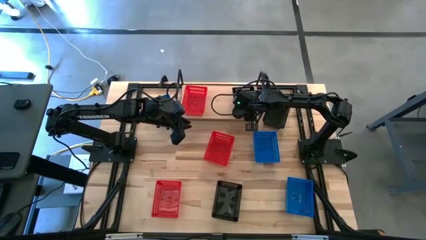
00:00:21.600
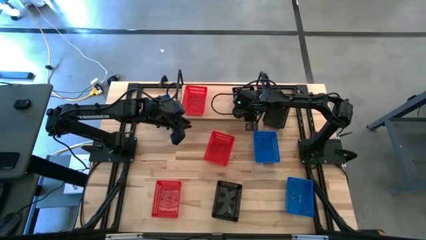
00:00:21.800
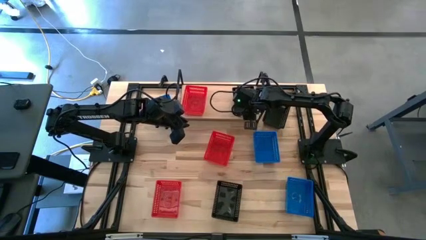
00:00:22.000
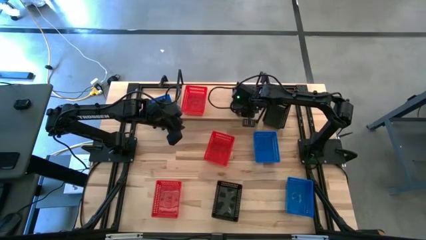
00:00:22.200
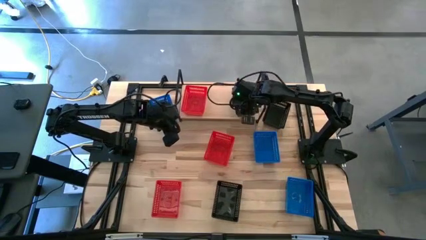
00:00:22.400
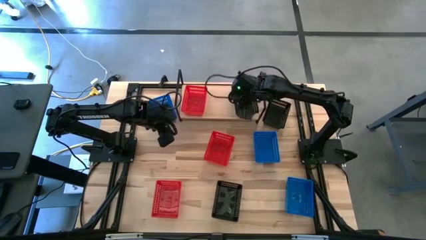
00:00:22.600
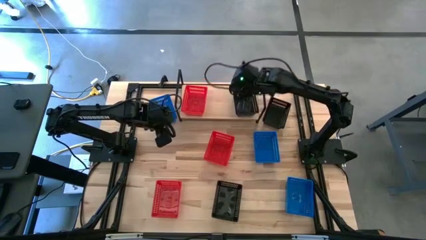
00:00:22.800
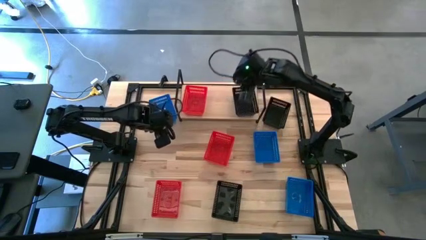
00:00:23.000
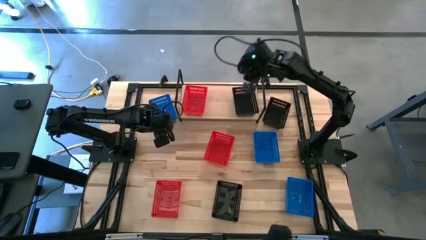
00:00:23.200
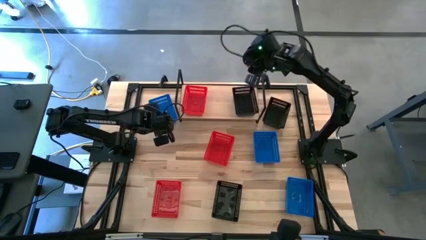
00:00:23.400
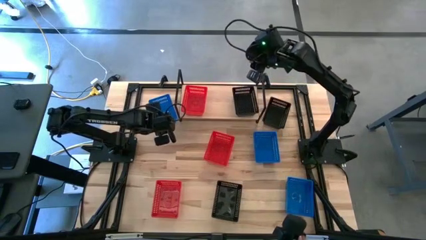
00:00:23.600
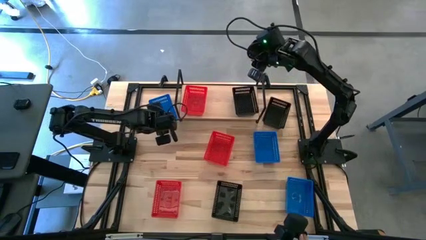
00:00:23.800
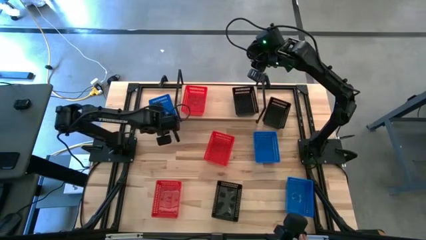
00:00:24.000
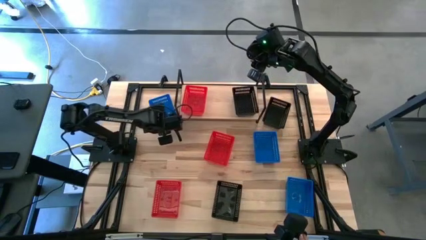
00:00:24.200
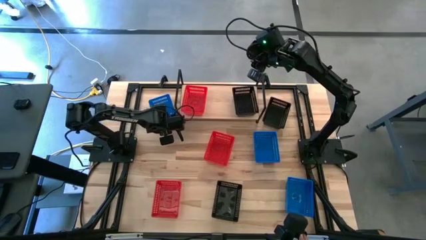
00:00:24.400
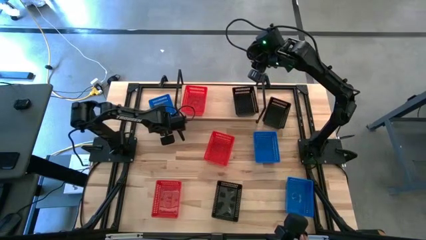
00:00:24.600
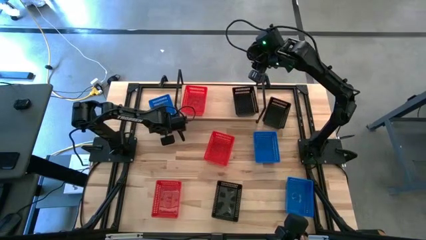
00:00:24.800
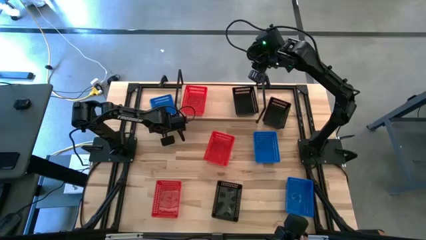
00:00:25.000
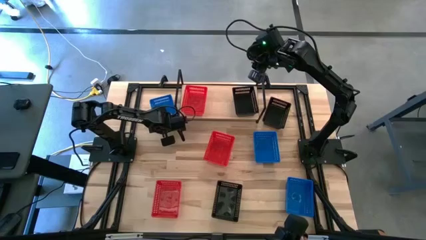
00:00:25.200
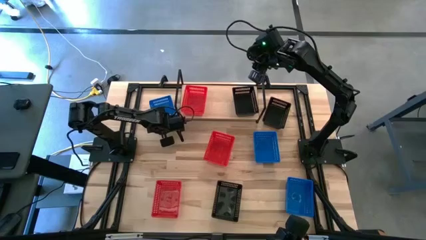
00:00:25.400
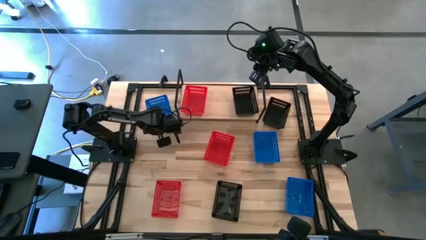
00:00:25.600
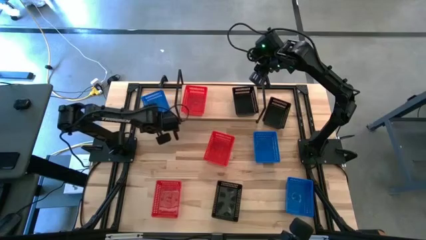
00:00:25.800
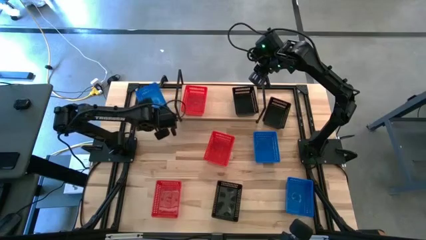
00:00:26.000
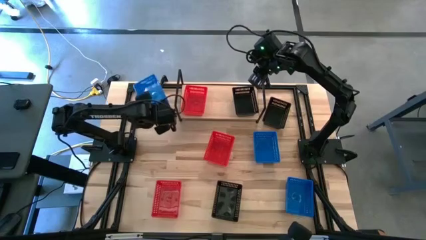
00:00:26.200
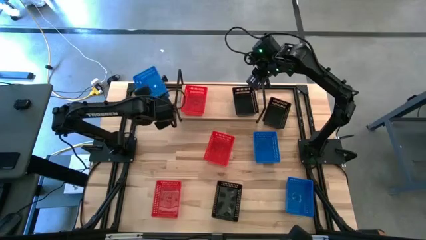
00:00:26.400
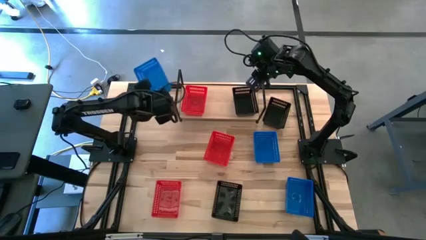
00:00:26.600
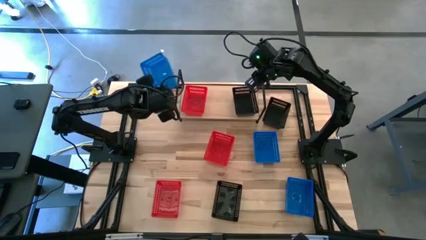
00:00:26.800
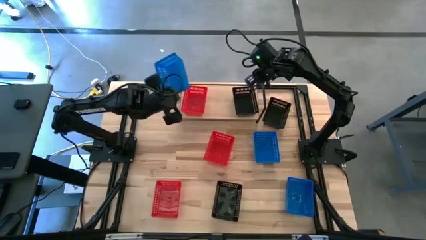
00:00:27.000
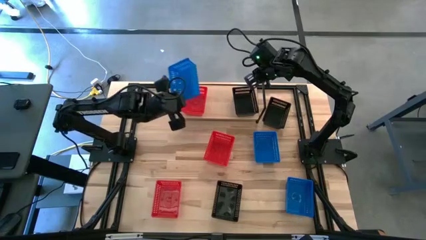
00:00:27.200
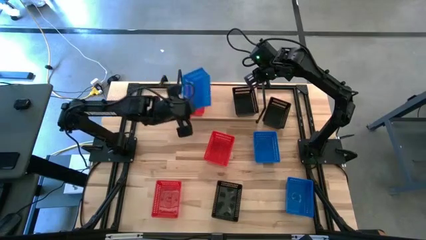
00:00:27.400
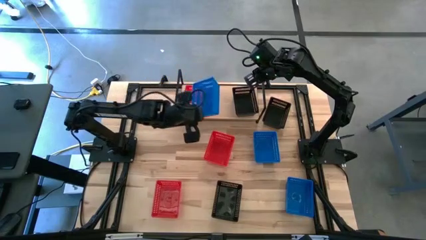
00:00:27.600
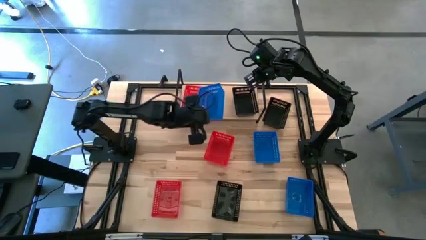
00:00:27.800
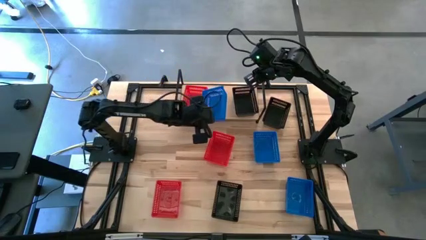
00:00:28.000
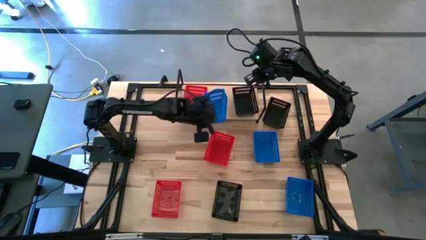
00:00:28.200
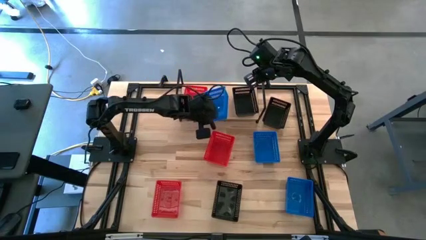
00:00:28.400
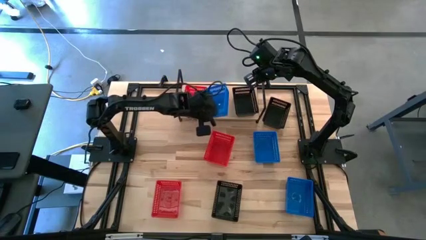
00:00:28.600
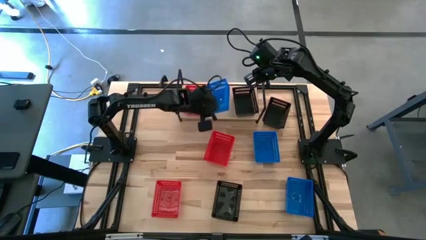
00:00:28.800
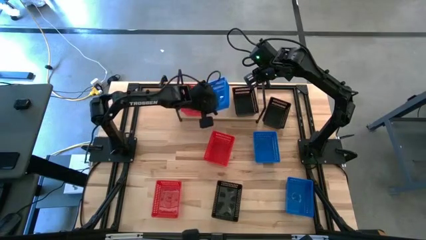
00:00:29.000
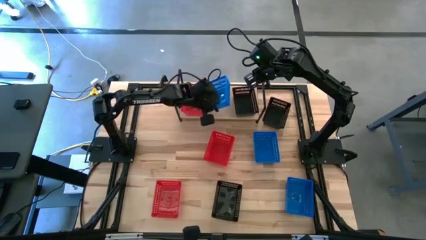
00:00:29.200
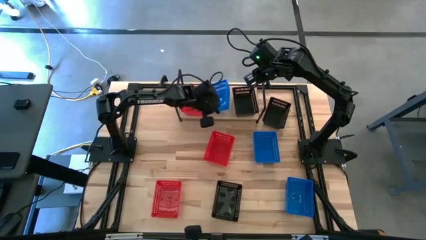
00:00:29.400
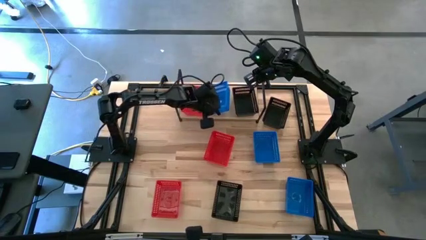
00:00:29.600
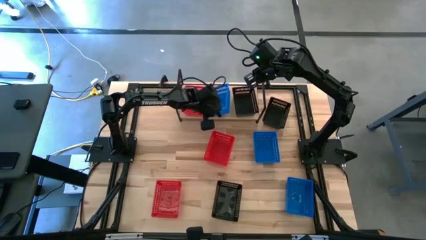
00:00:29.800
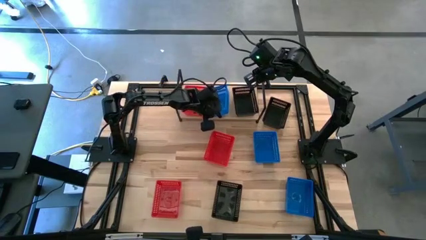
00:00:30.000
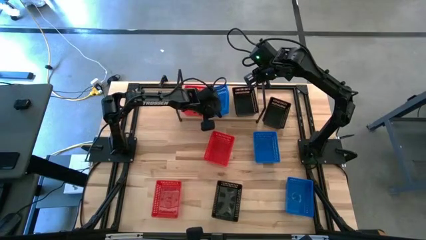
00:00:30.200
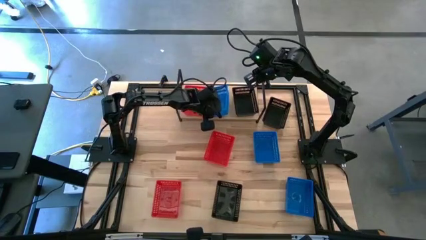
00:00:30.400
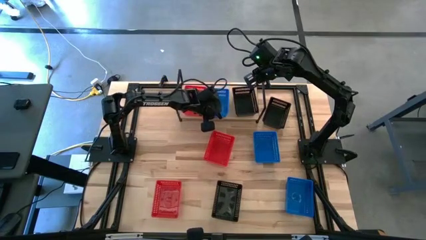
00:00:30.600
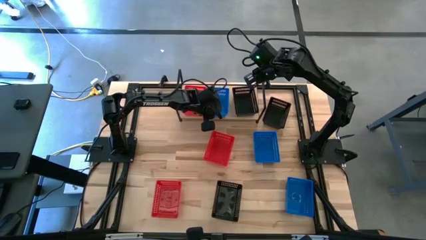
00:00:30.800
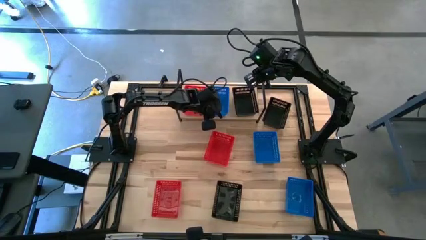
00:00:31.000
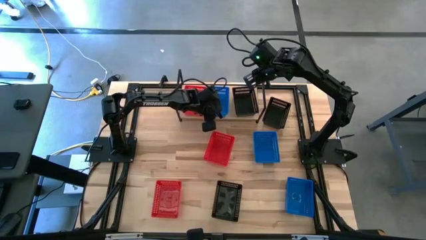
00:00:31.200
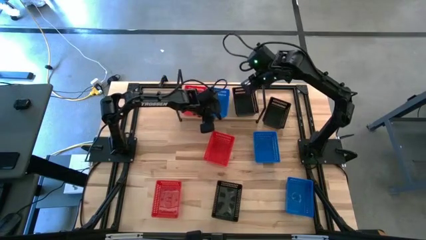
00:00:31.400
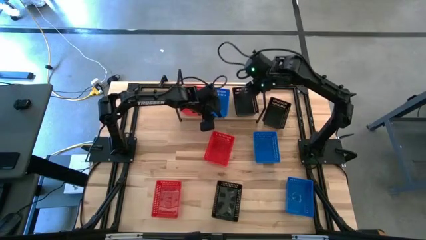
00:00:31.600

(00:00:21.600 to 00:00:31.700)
Task: Stack baskets on shelf by color
Put the top blue bin on the shelf

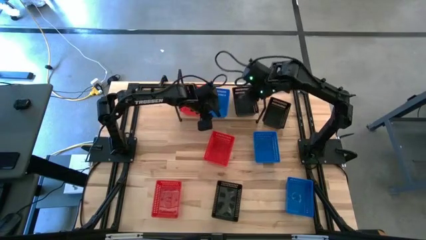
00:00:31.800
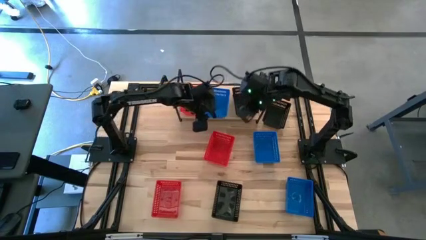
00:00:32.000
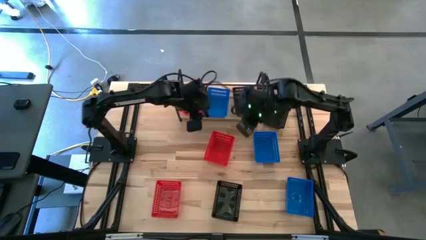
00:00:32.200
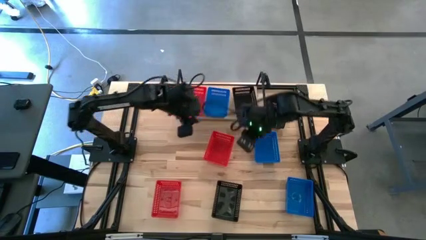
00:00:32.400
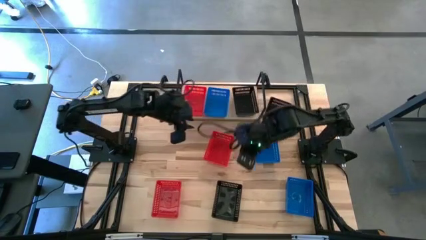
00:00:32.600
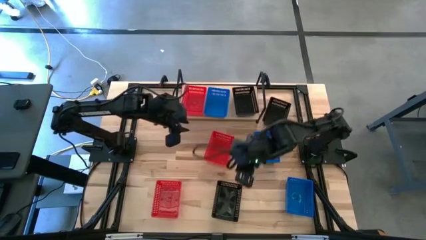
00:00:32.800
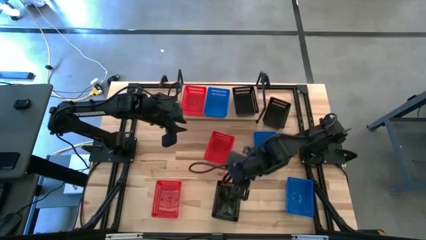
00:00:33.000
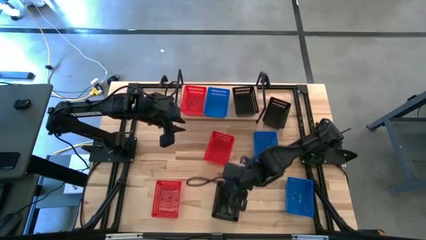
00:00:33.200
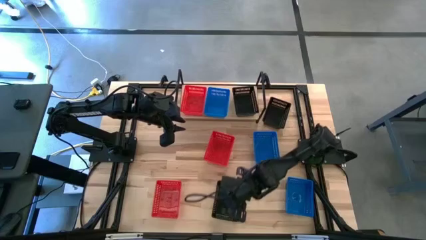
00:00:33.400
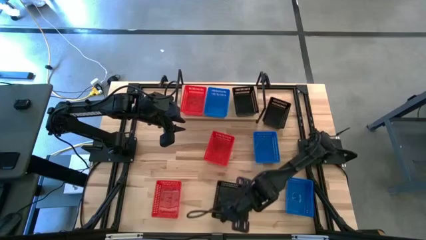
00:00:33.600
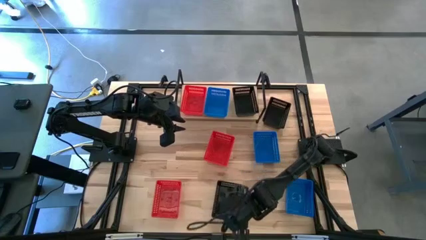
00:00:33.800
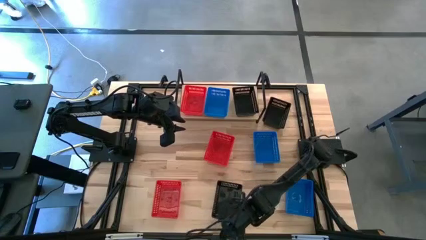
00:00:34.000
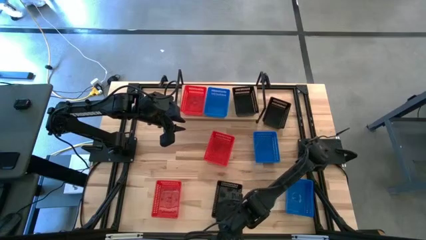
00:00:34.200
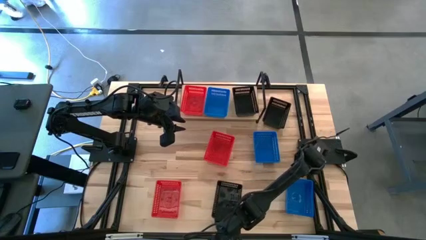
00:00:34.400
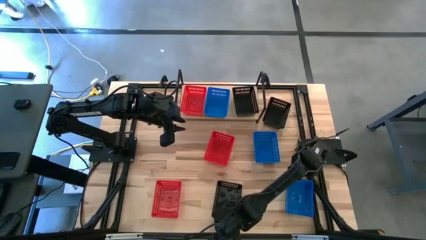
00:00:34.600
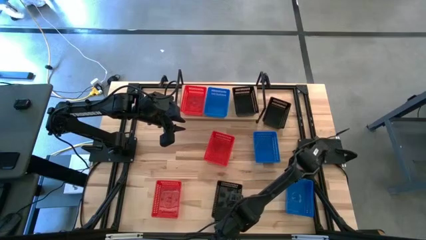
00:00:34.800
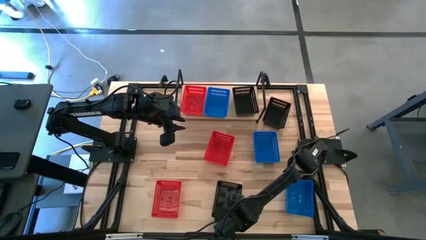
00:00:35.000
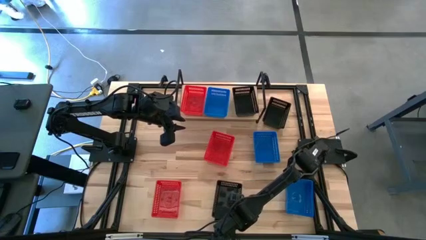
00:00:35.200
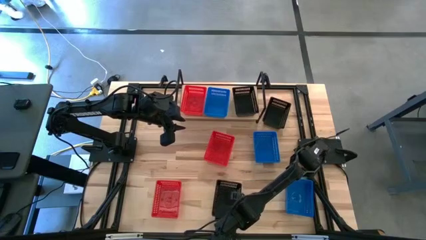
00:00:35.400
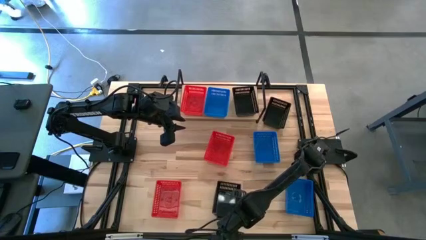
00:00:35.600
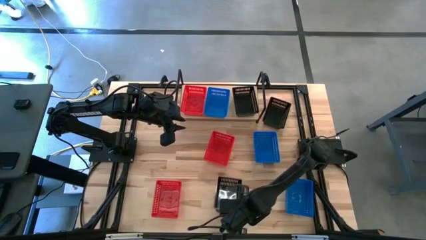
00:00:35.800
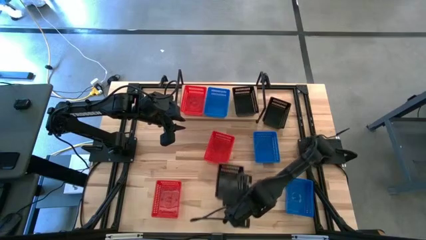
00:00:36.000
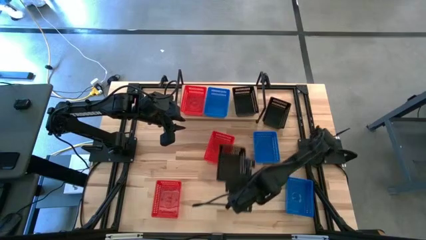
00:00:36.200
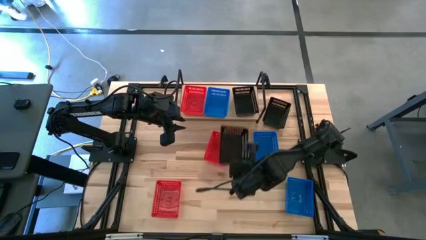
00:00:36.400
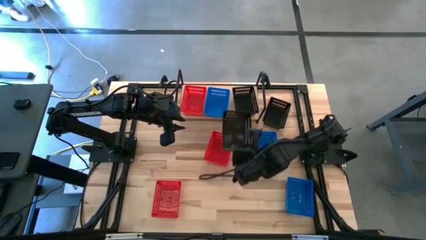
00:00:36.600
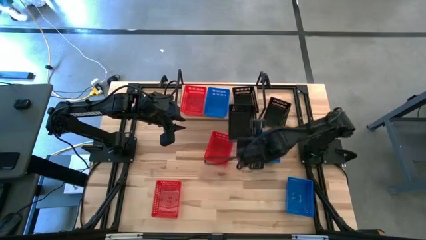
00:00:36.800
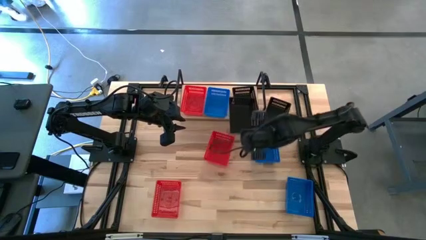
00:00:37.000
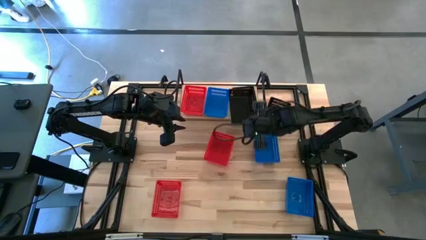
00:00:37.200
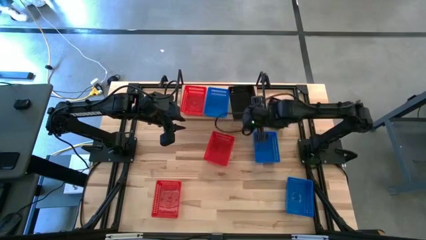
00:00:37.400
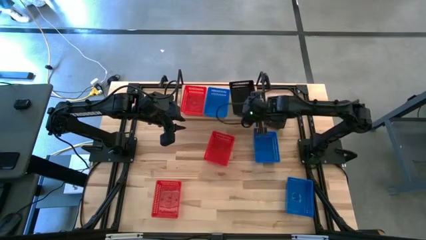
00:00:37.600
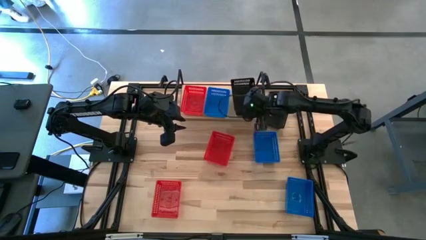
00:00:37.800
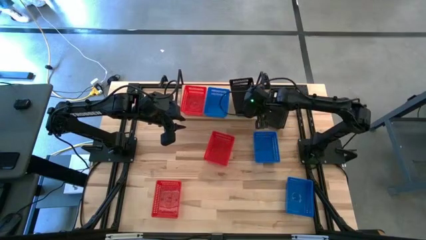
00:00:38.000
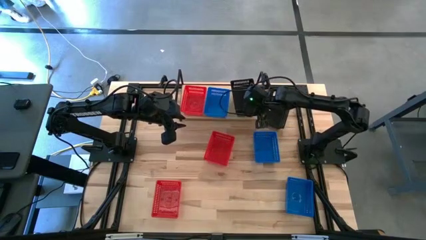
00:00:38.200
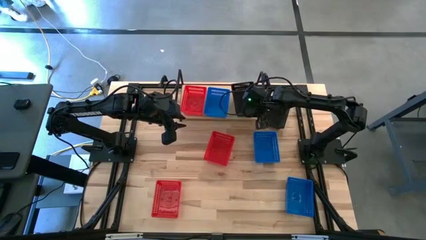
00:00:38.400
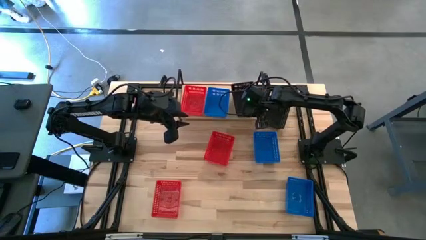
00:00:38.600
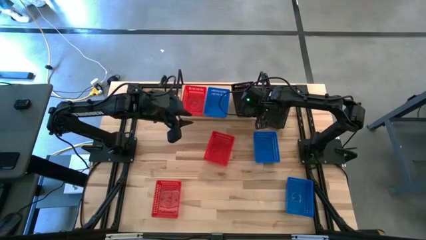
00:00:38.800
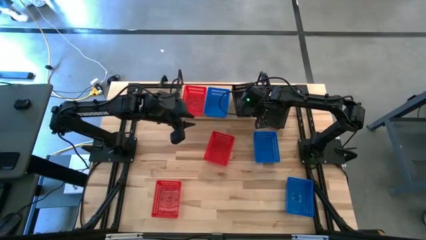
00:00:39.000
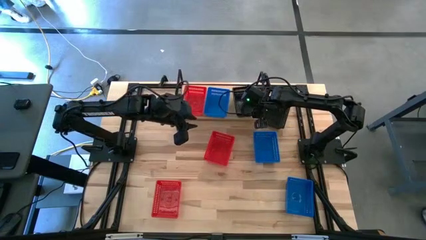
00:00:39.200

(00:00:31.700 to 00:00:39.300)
Stack the bottom black bin on top of the black bin on the shelf
